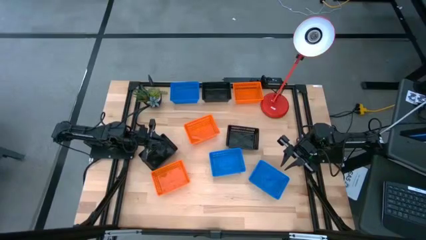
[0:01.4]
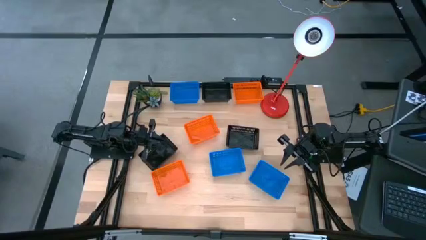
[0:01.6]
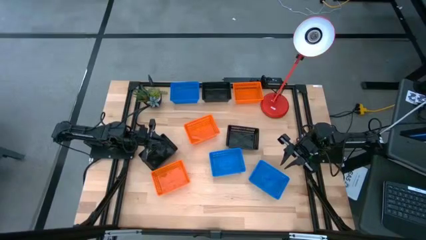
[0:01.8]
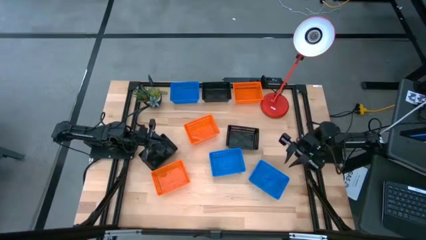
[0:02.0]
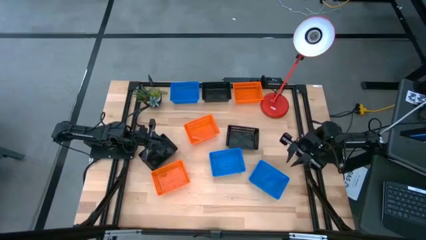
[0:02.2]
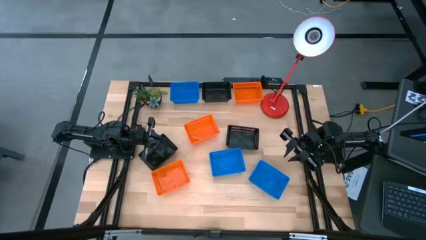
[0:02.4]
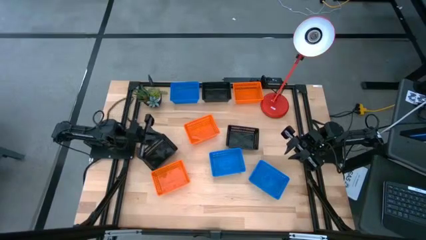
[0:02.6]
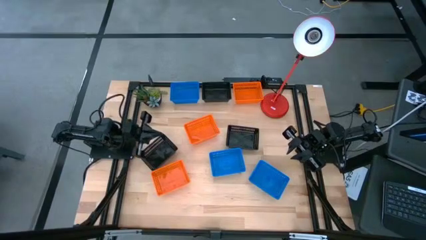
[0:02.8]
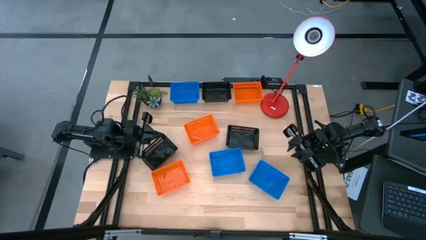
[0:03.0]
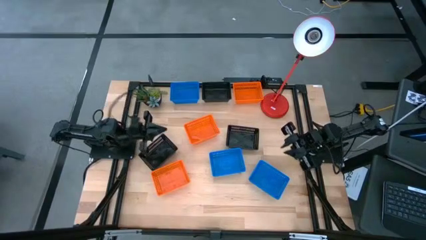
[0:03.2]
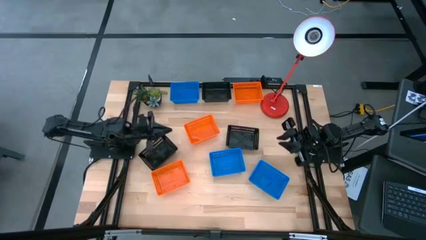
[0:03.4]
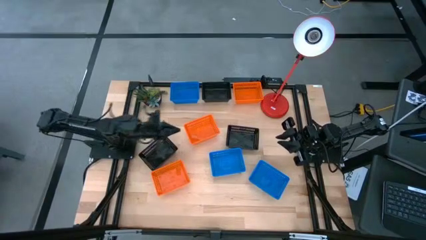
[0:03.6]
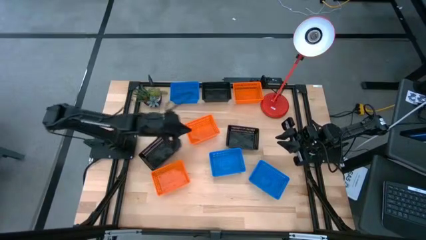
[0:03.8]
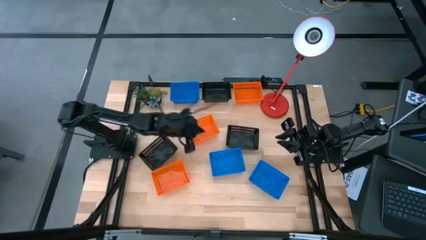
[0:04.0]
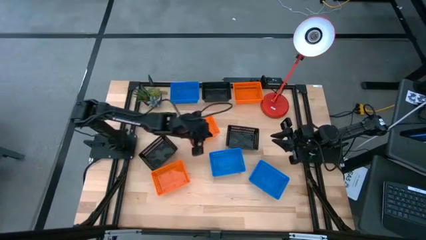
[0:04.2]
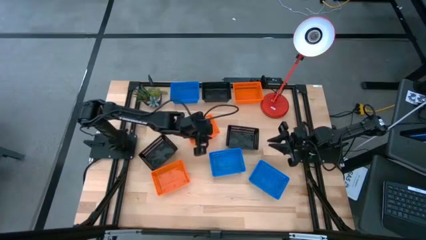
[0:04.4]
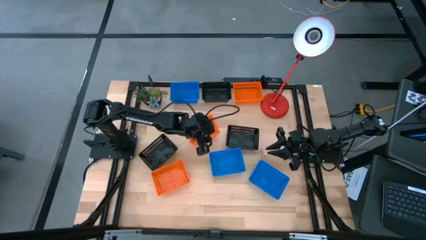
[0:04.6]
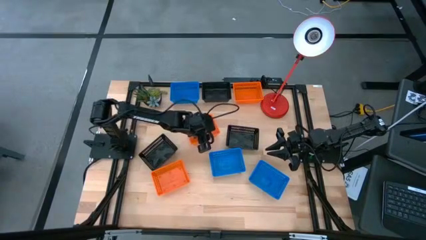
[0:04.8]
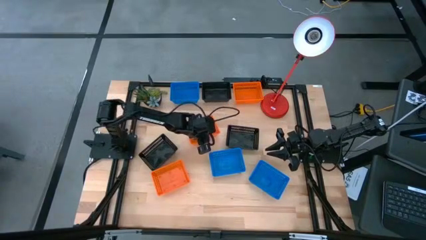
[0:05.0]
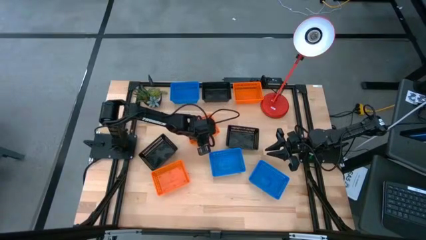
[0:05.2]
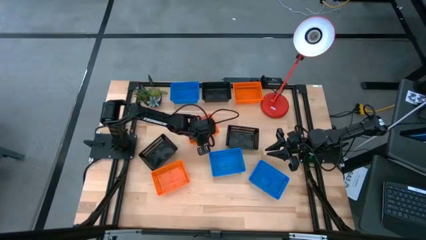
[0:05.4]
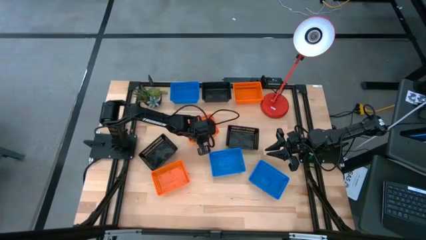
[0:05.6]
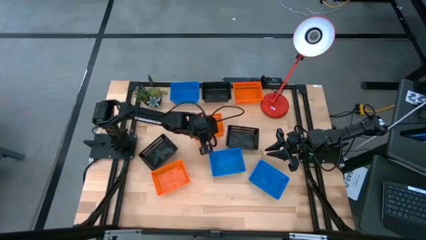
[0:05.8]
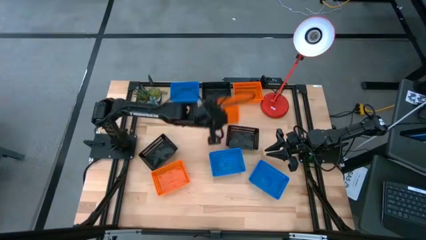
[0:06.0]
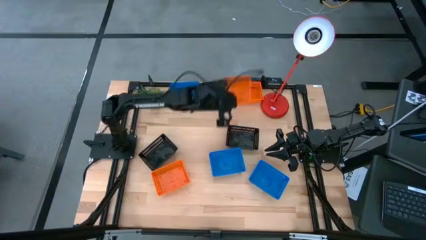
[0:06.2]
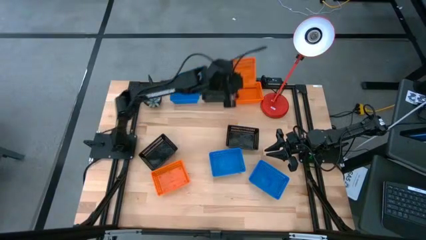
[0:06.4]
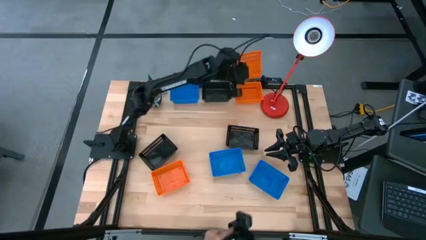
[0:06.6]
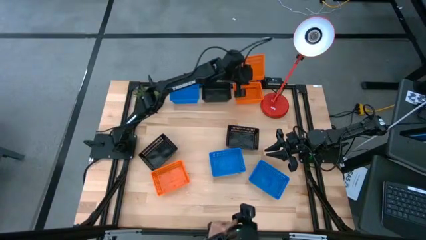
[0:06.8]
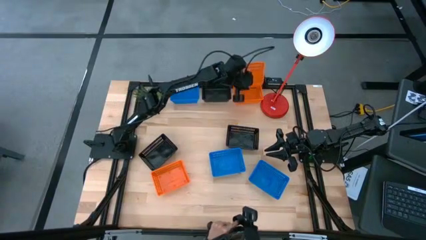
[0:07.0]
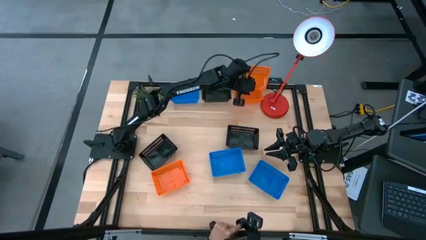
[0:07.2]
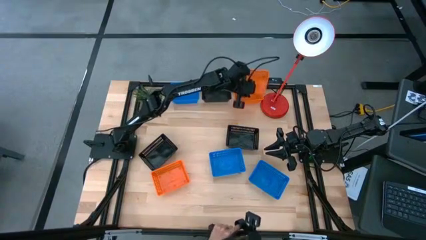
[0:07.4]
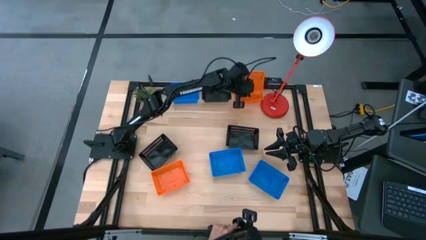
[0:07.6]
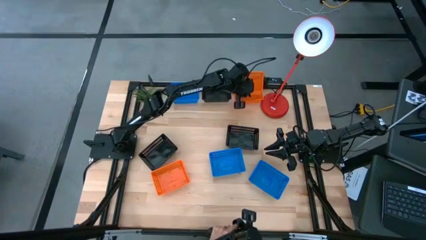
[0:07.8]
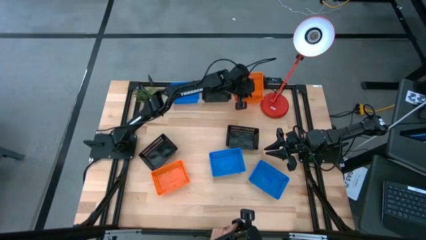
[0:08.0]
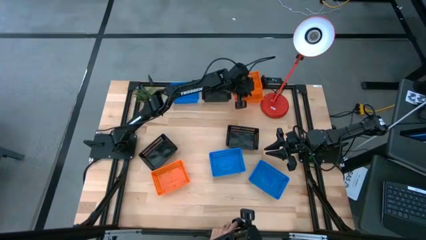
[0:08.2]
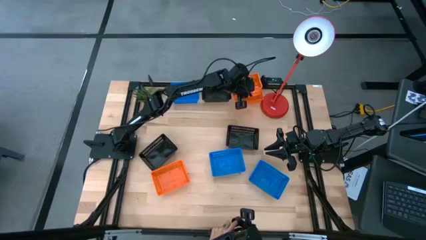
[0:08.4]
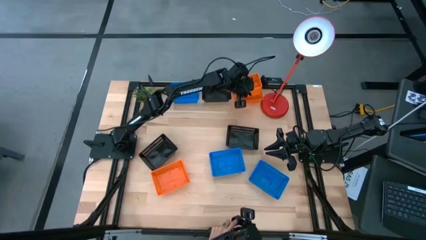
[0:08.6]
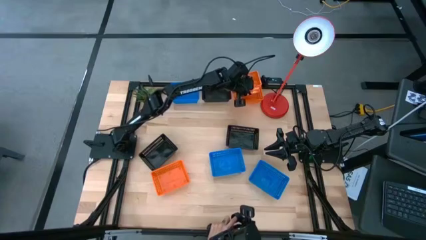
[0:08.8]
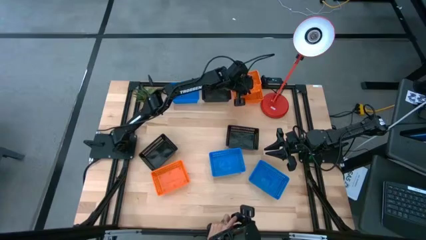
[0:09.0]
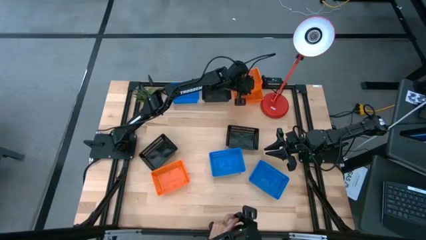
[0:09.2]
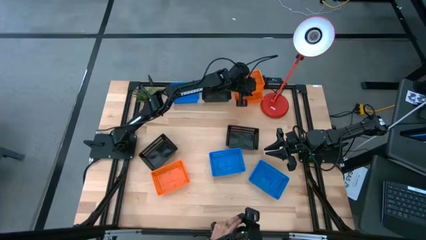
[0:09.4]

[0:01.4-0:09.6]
Stack the middle orange bin on top of the top orange bin

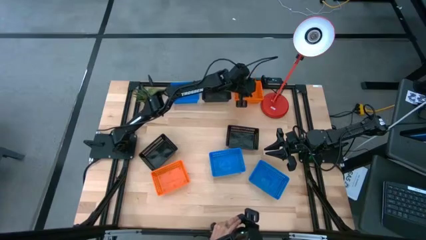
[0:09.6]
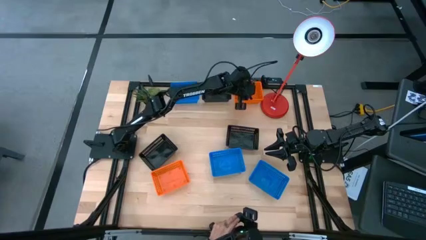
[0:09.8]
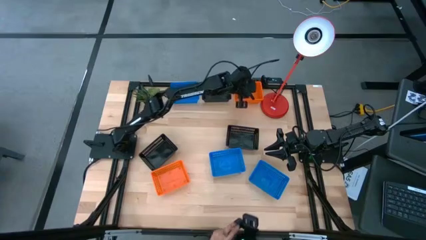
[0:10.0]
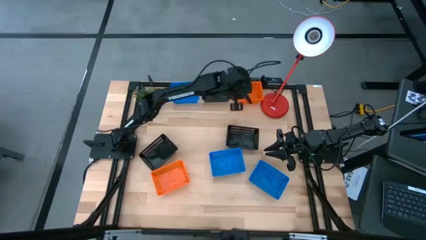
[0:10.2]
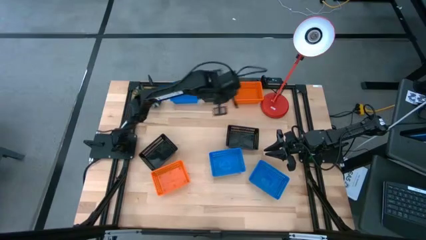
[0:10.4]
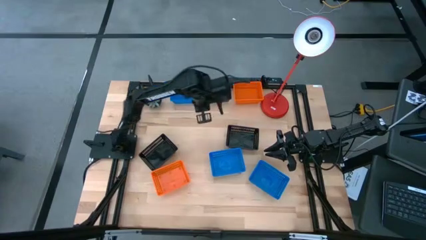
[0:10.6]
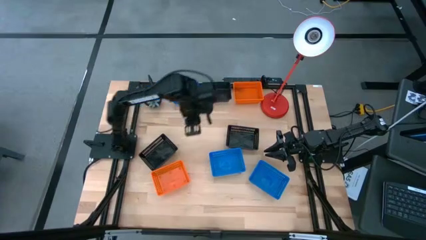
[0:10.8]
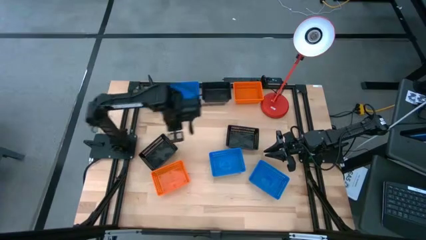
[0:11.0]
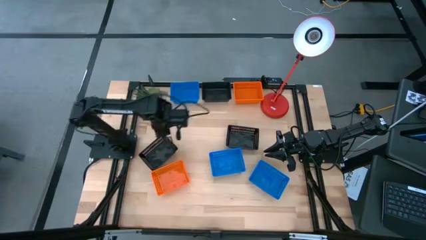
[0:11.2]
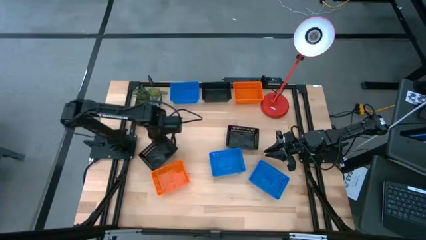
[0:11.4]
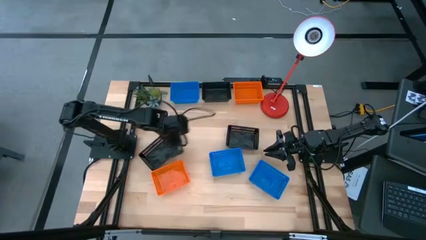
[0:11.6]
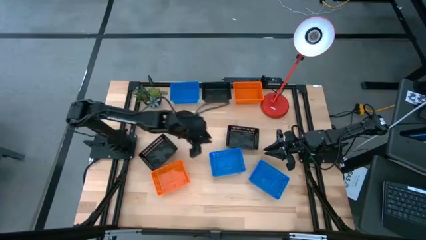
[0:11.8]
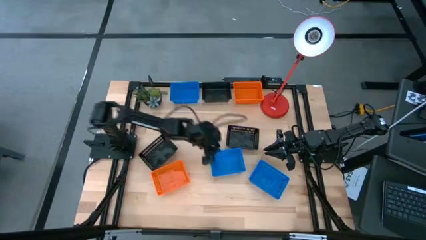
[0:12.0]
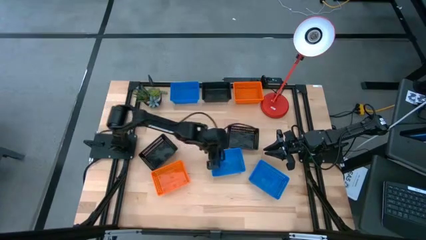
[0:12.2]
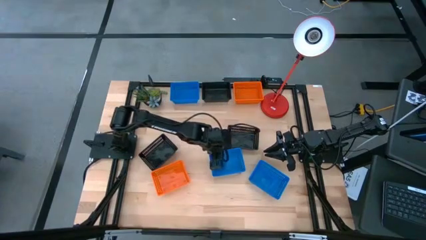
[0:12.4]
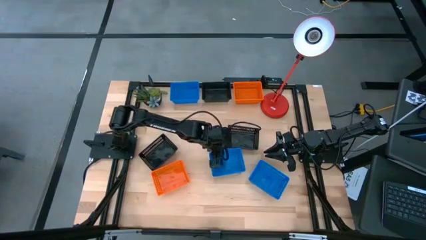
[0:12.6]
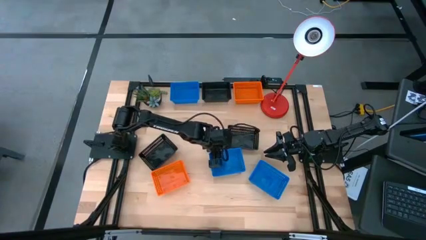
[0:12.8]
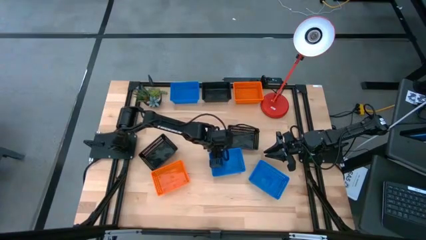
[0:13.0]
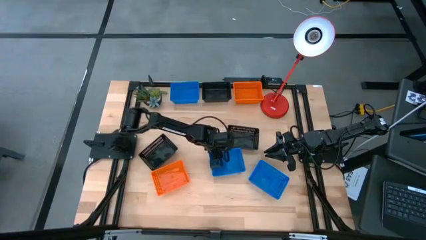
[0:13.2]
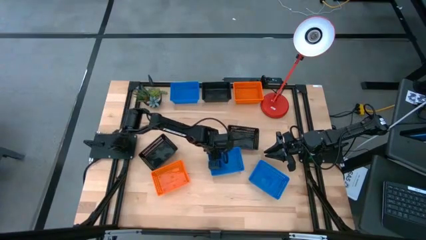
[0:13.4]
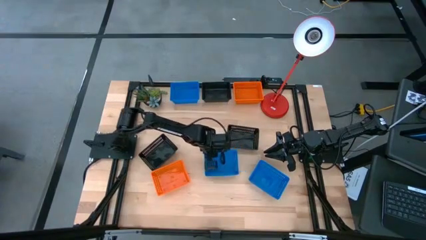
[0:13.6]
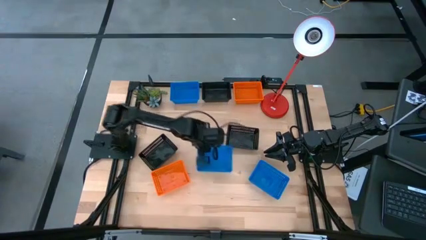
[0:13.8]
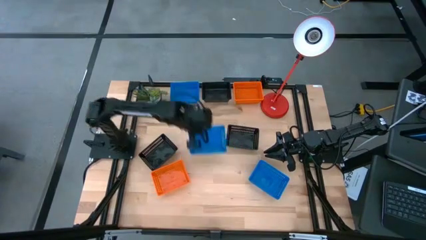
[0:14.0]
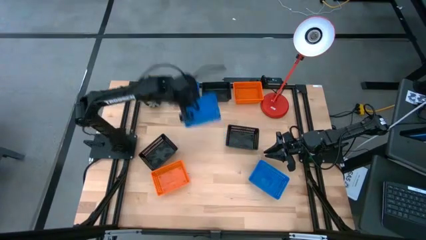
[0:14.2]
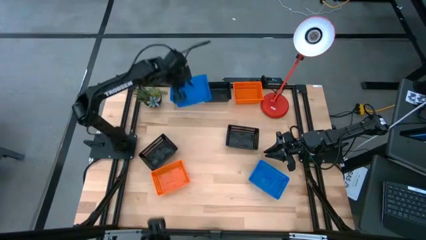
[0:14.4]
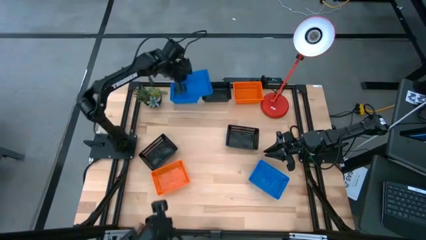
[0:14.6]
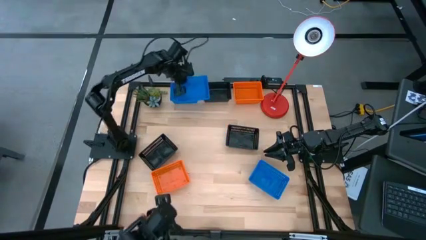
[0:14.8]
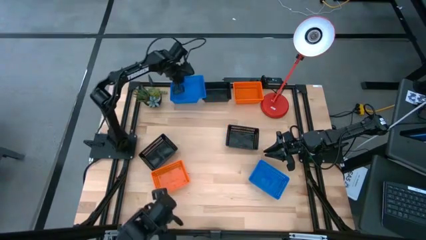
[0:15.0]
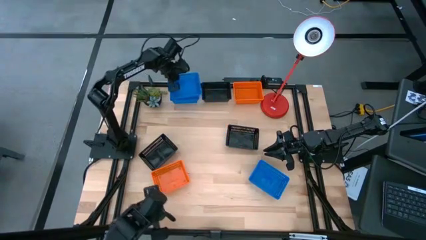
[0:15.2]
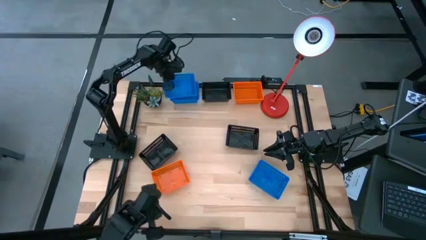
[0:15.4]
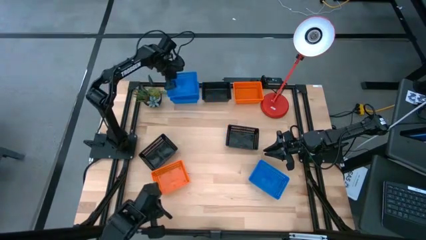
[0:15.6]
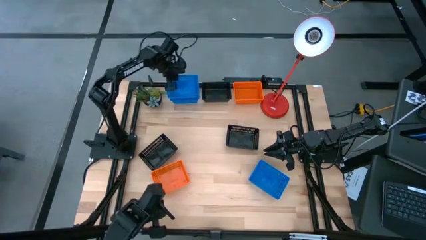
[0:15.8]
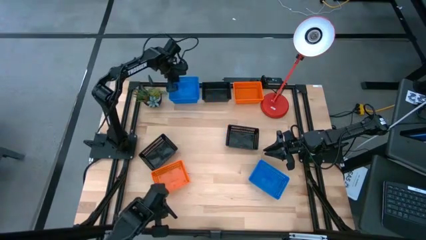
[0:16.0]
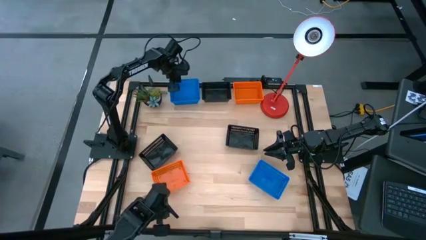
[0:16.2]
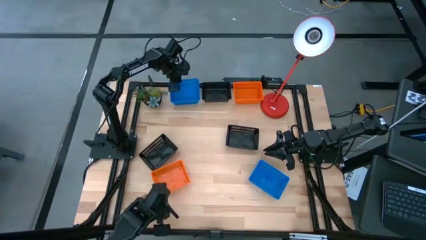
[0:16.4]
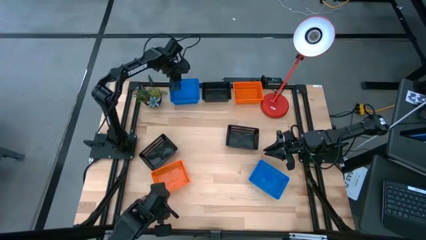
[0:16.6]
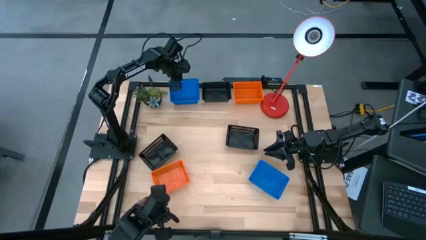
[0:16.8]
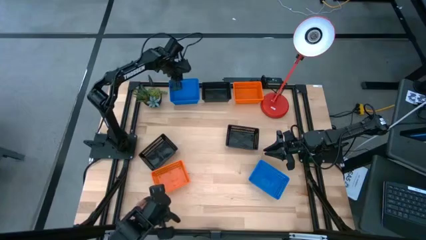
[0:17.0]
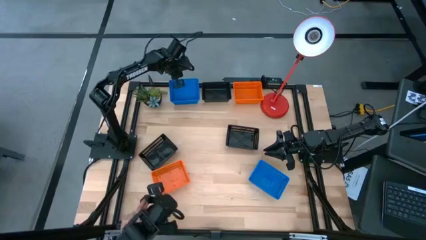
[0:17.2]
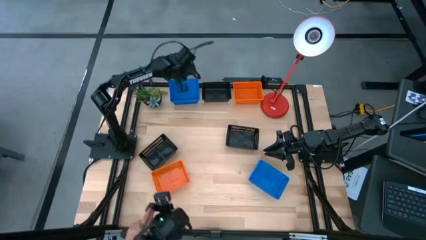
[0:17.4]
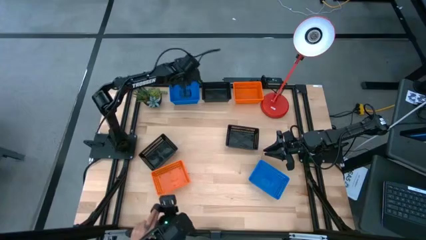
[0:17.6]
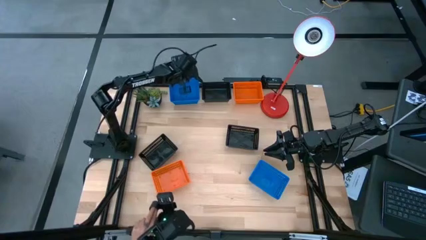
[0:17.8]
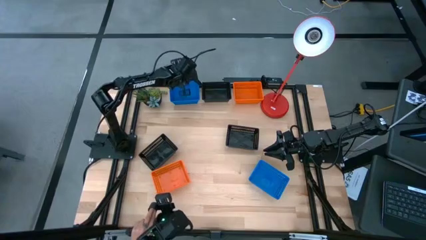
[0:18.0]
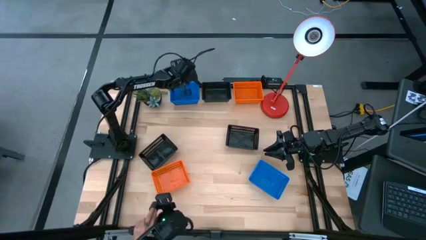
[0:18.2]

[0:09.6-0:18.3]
Stack the middle blue bin on top of the top blue bin
